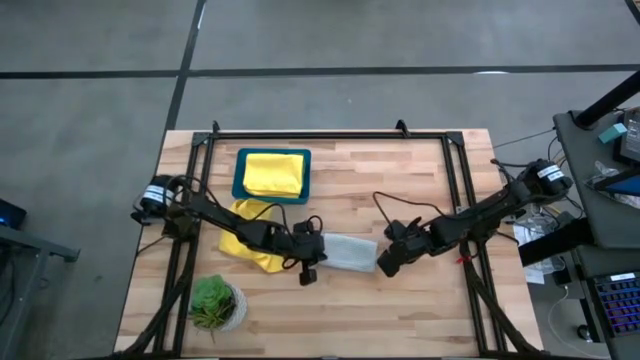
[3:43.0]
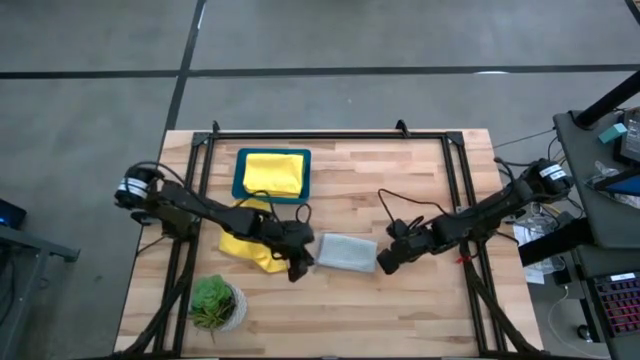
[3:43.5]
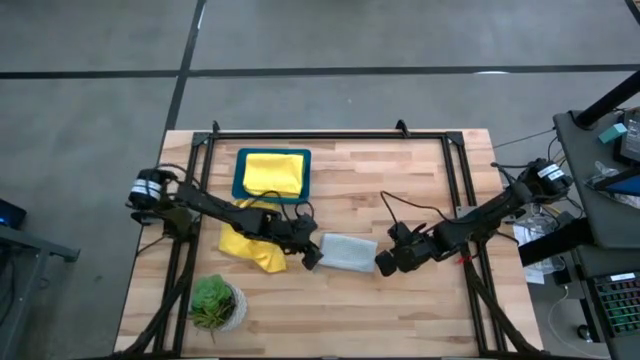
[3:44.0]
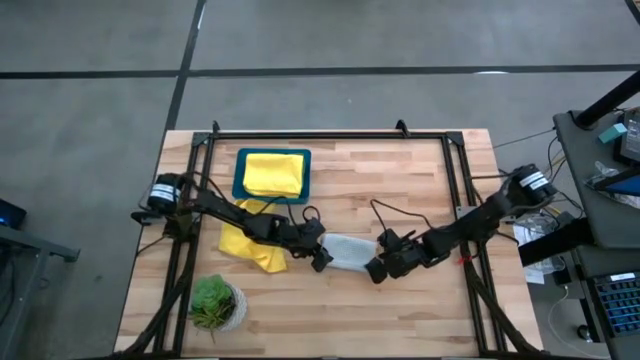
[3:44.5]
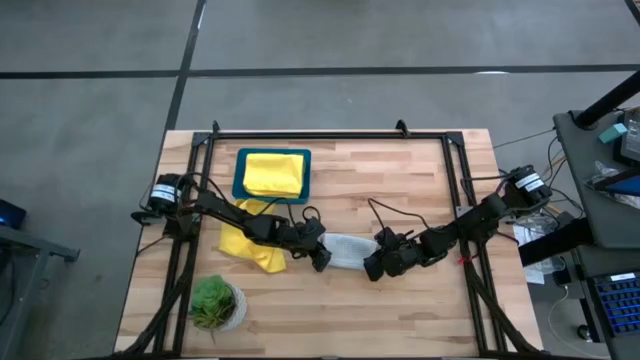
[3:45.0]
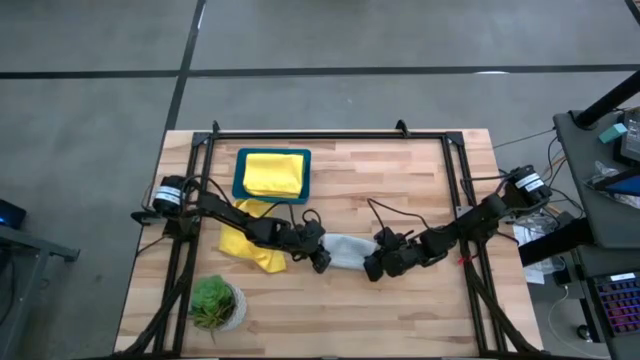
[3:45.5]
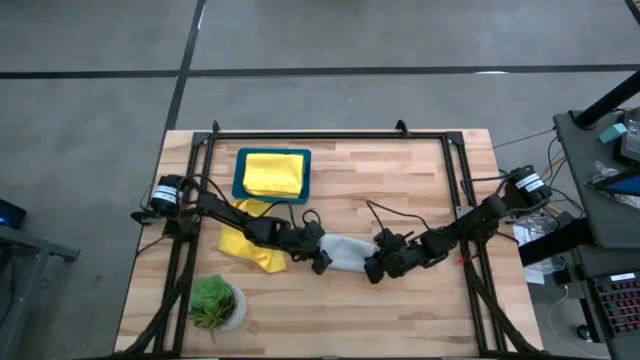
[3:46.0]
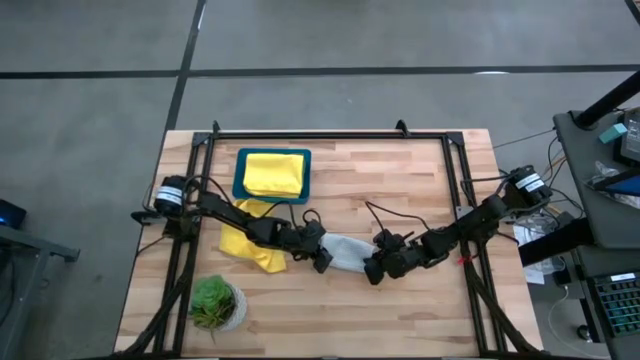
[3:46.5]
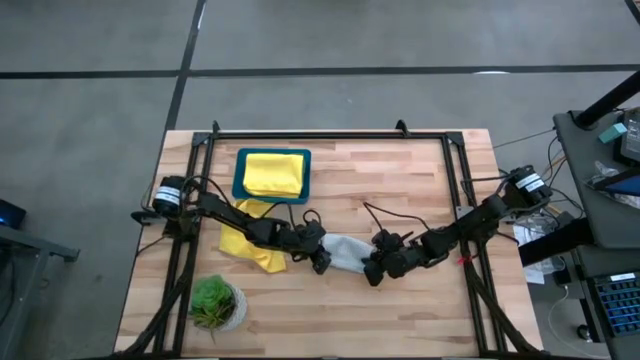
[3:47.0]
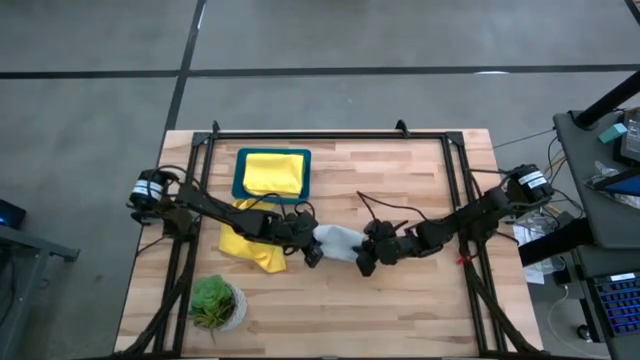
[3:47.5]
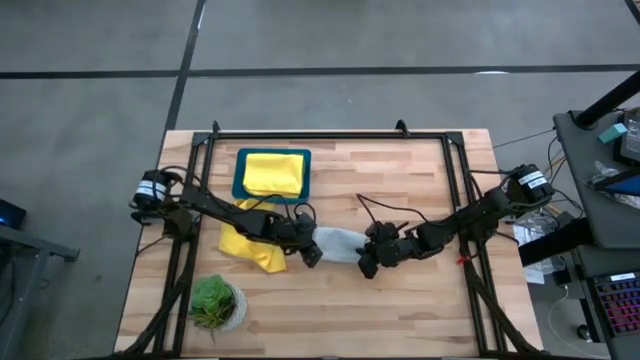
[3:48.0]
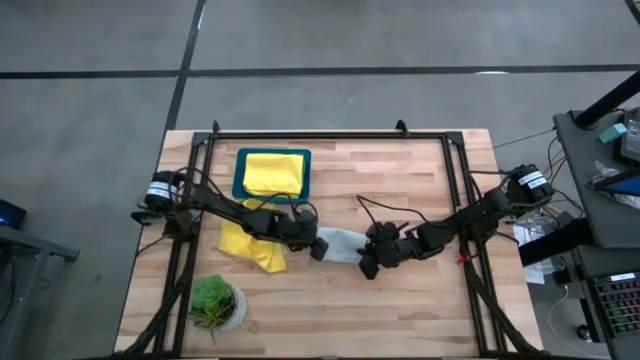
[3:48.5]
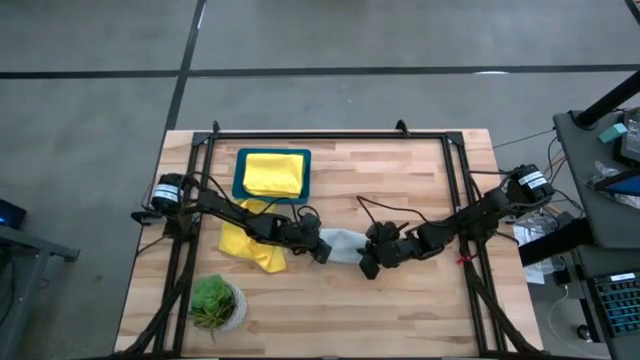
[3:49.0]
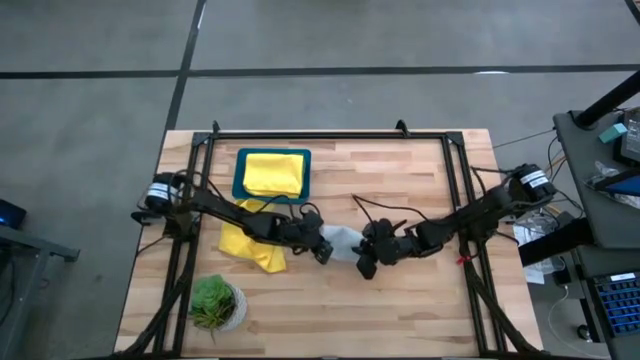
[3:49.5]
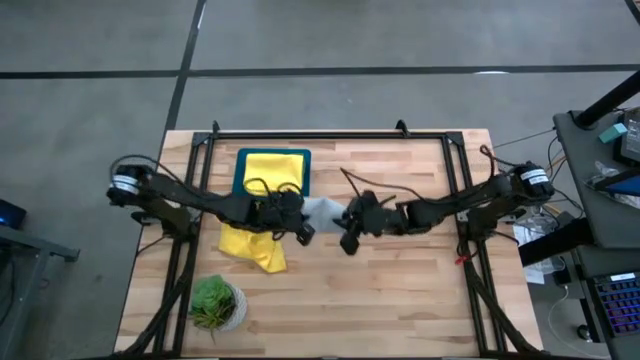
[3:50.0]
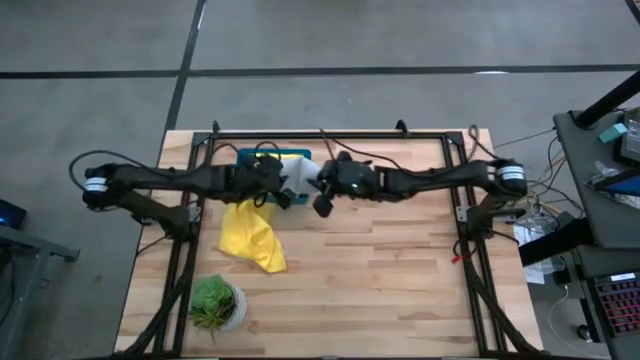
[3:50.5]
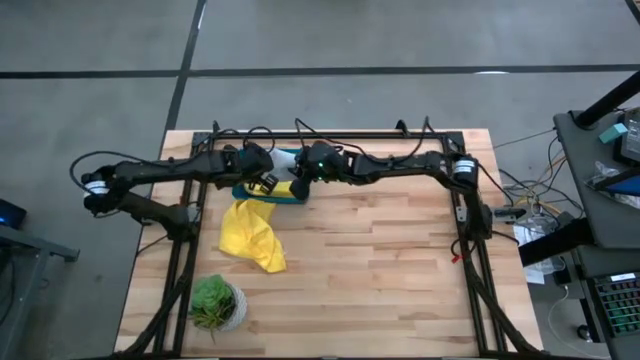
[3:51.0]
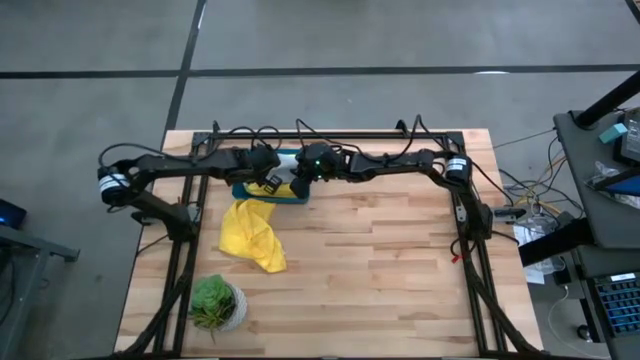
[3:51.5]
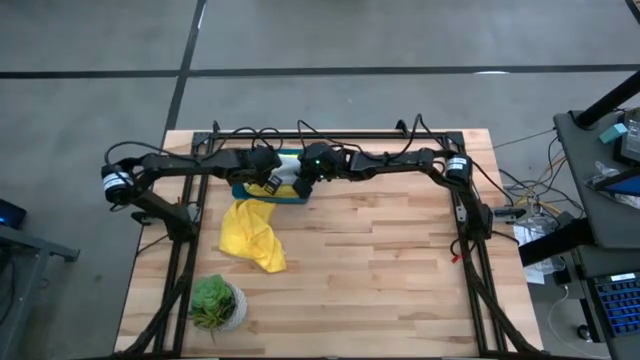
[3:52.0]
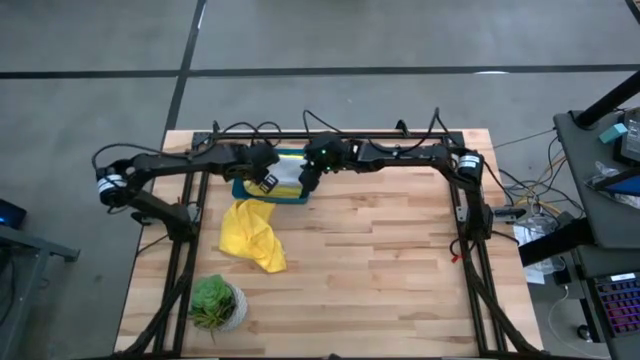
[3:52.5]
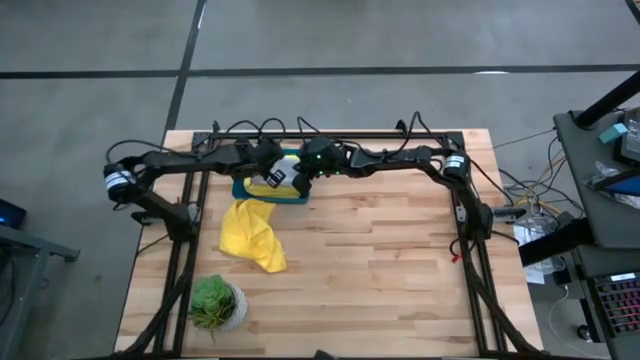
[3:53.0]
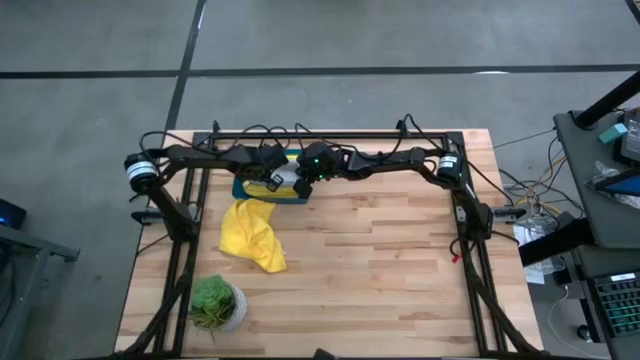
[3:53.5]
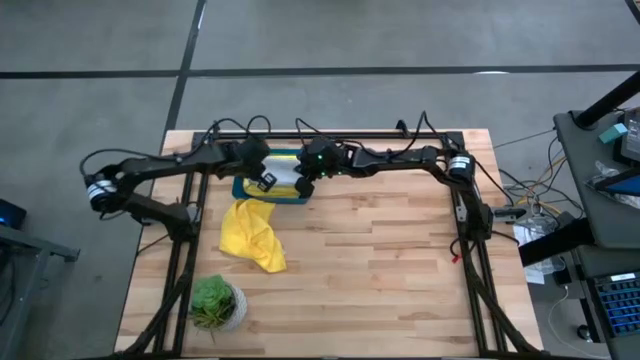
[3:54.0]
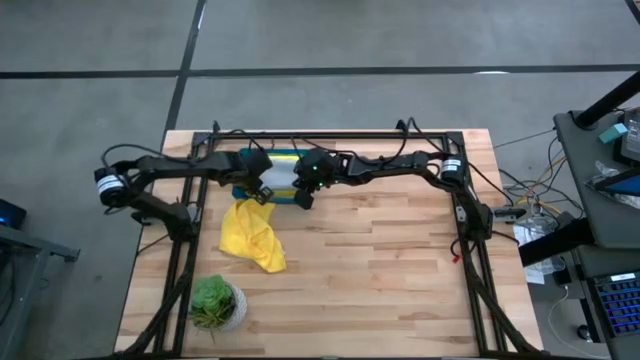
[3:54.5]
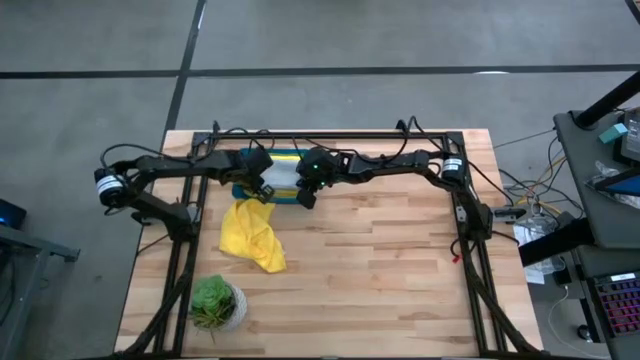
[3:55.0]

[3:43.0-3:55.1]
Task: Fold microfiber towels
Put the gray microfiber towel into the blue bin

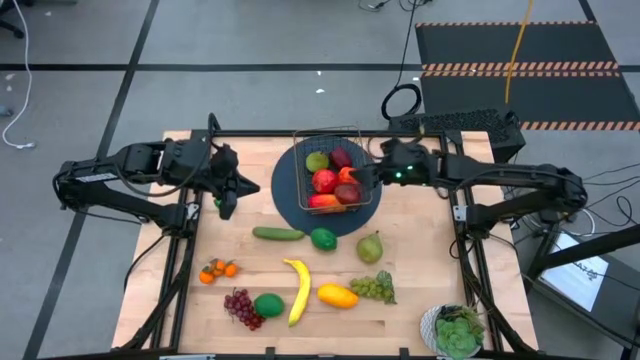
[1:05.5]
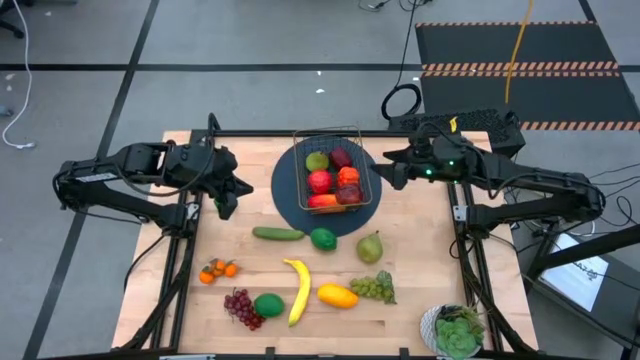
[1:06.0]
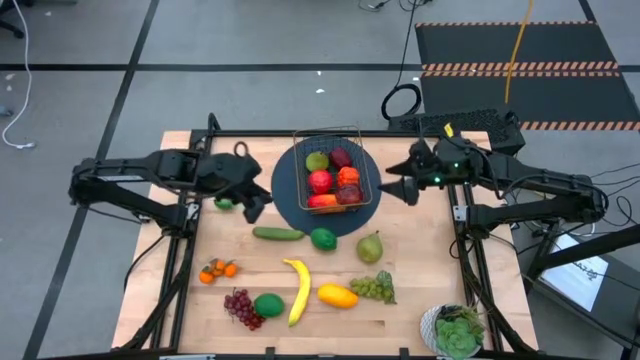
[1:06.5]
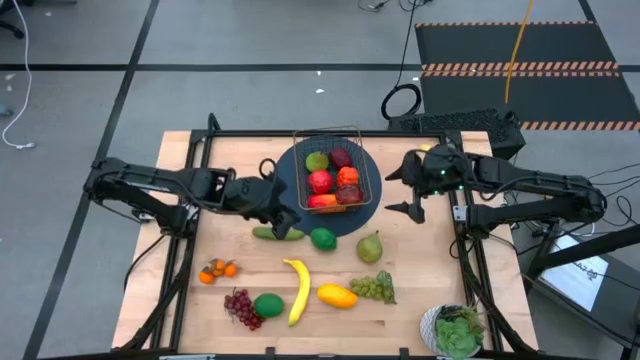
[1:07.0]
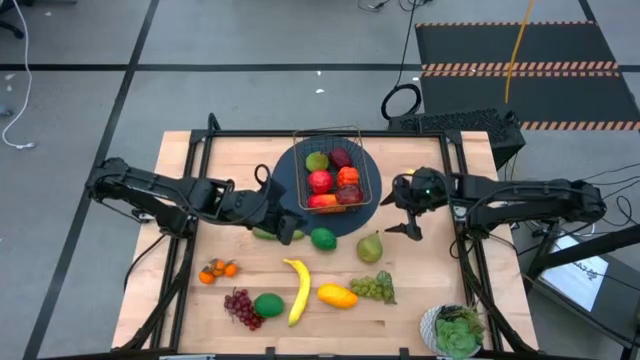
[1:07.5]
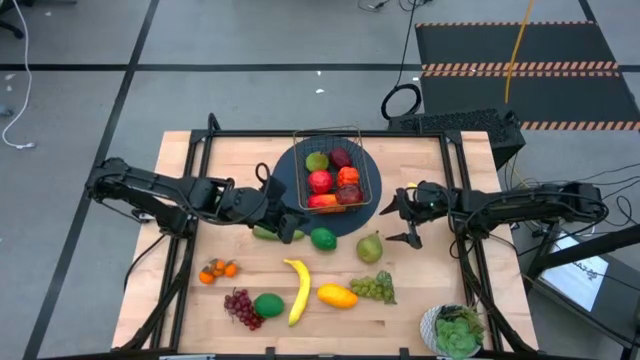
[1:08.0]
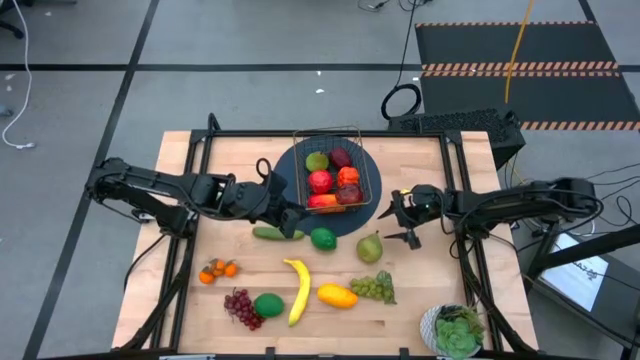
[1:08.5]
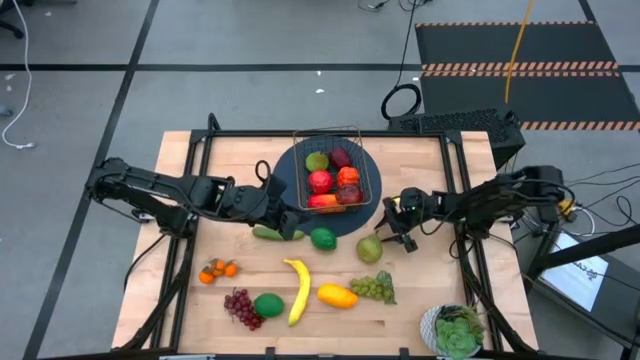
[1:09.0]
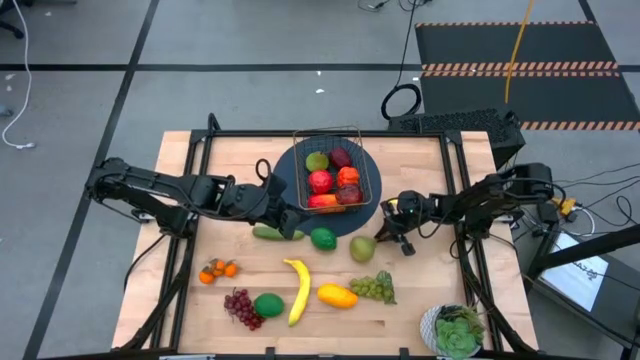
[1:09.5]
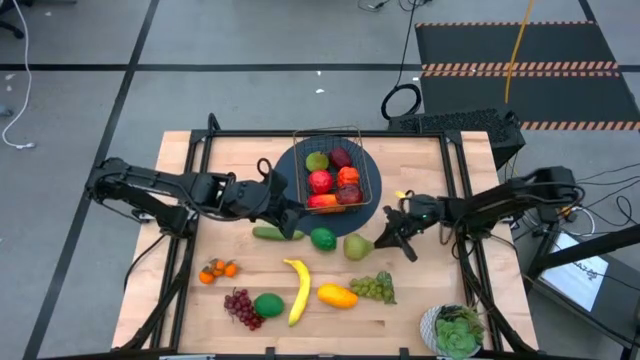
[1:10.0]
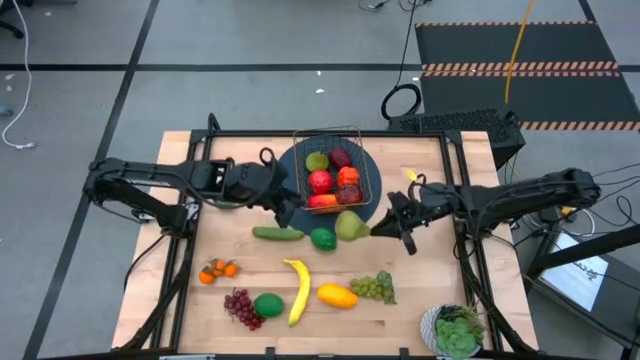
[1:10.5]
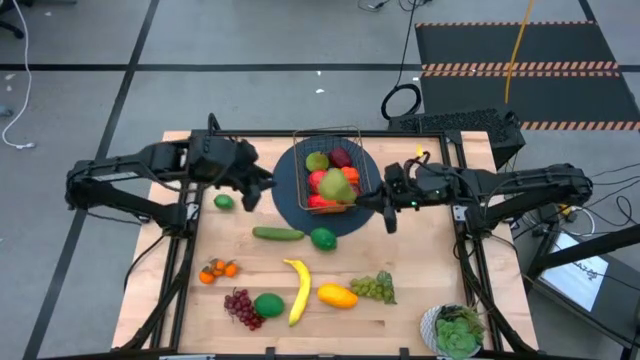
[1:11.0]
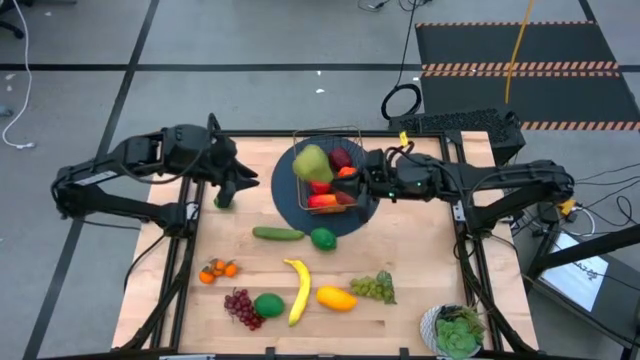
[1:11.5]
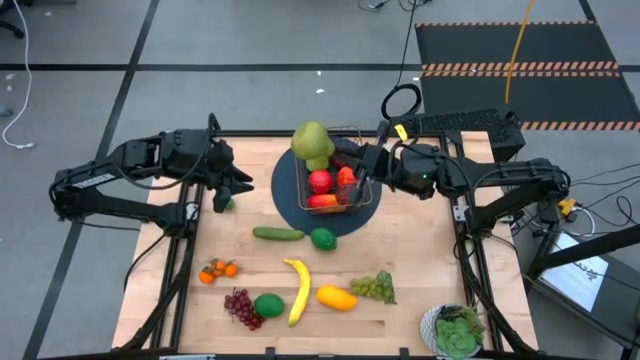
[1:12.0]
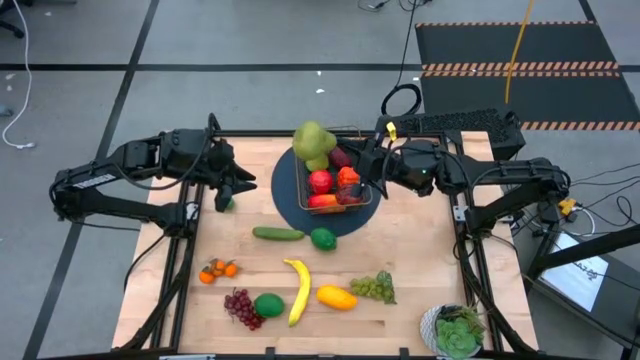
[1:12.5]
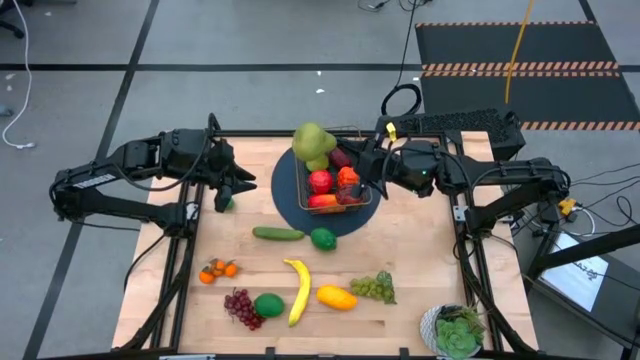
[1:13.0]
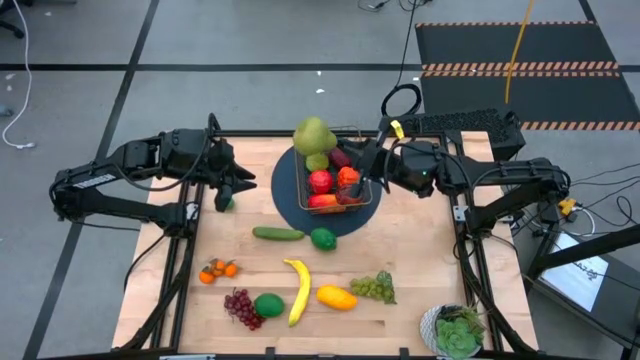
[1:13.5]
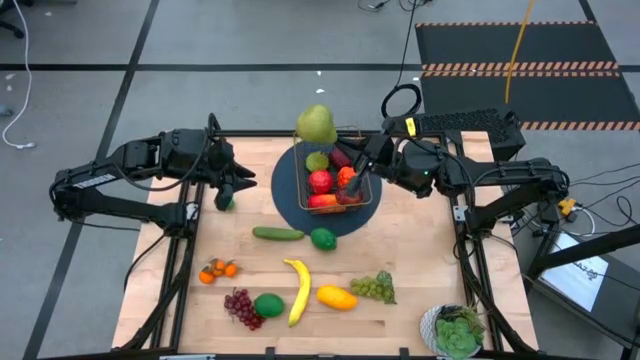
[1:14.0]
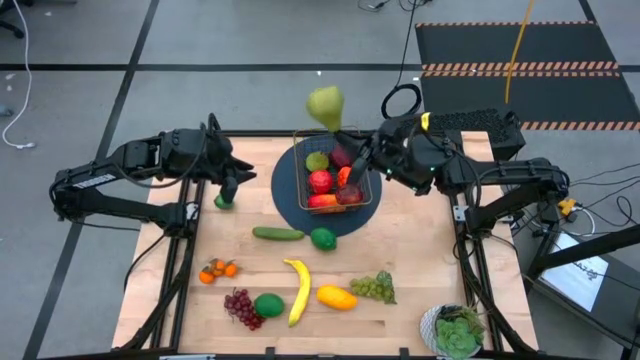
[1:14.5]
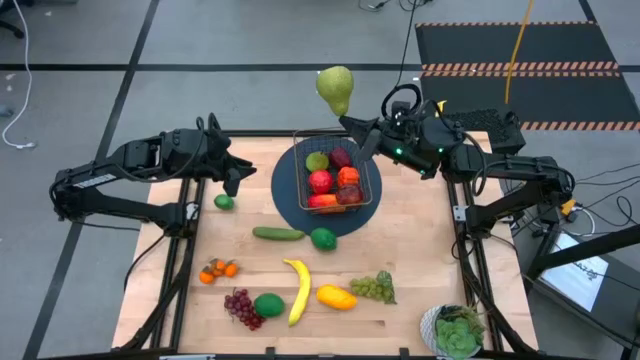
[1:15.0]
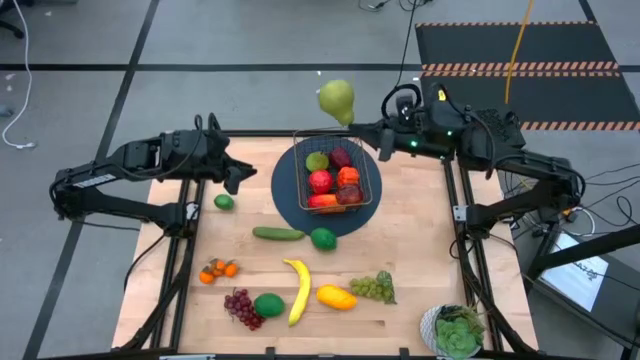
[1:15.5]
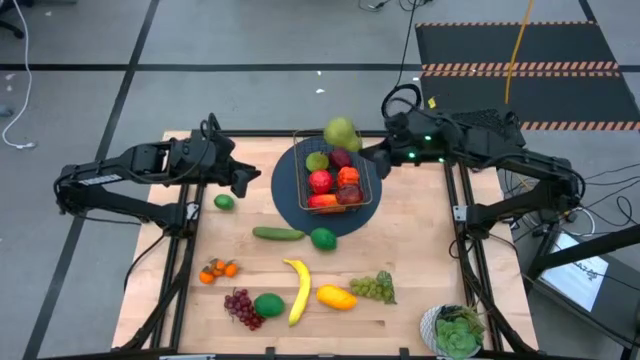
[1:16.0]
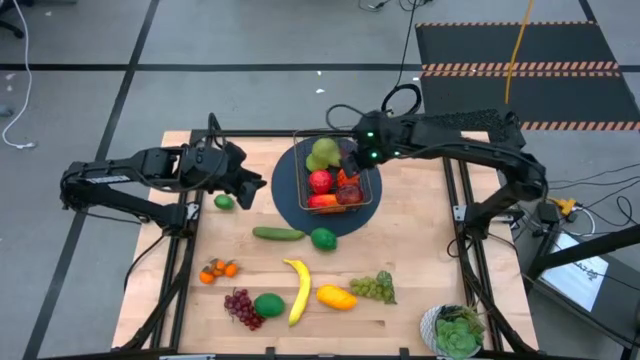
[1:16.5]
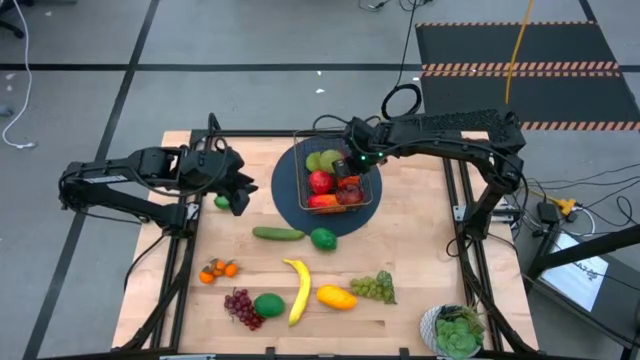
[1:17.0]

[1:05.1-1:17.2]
Task: Build produce basket
Put the green pear into the gold wire basket
